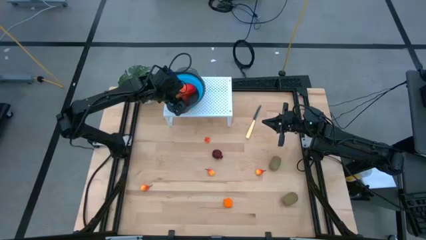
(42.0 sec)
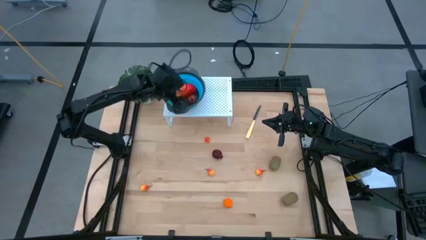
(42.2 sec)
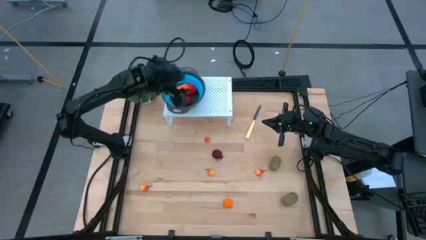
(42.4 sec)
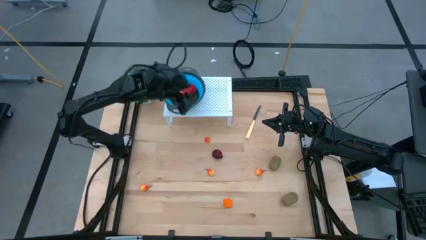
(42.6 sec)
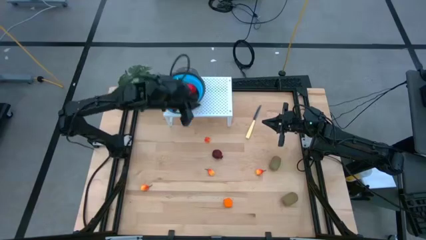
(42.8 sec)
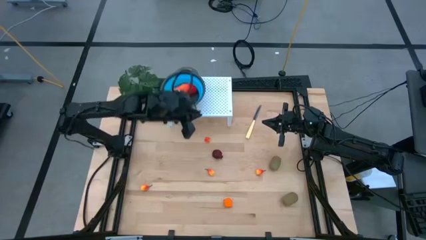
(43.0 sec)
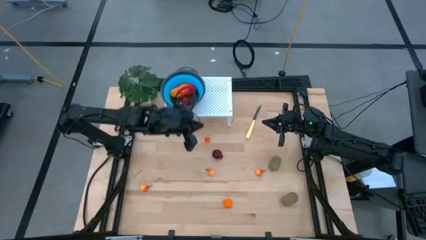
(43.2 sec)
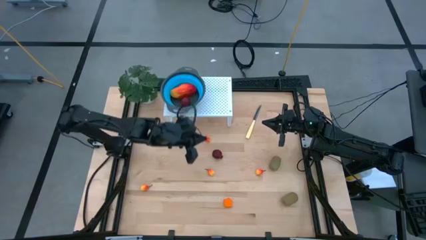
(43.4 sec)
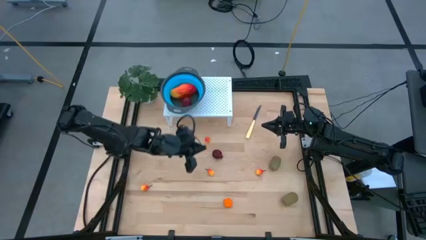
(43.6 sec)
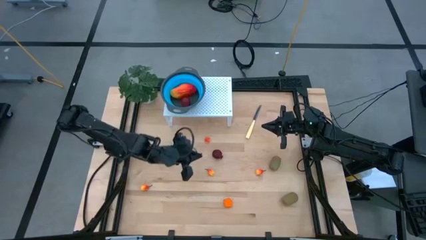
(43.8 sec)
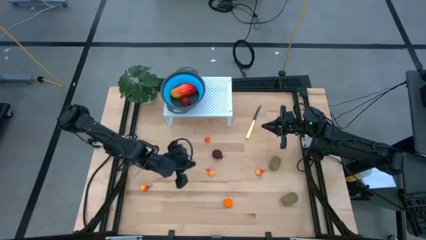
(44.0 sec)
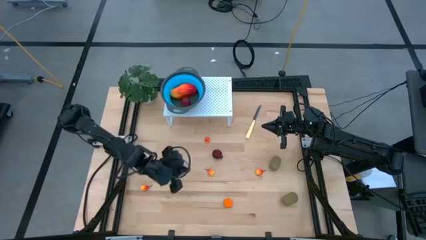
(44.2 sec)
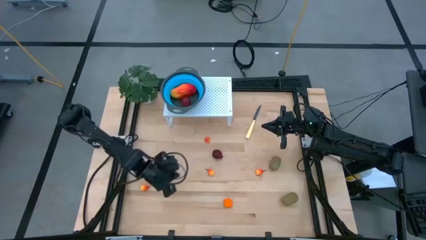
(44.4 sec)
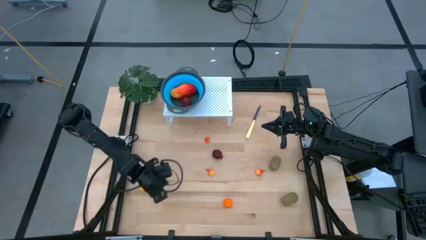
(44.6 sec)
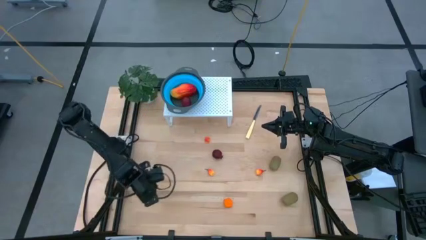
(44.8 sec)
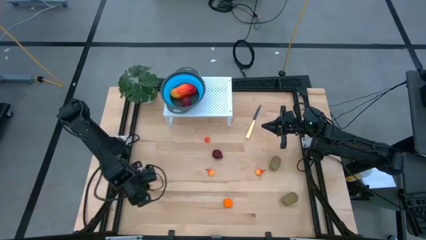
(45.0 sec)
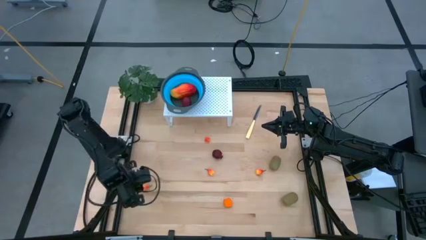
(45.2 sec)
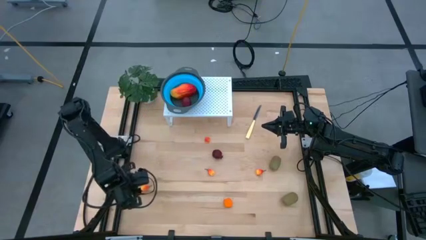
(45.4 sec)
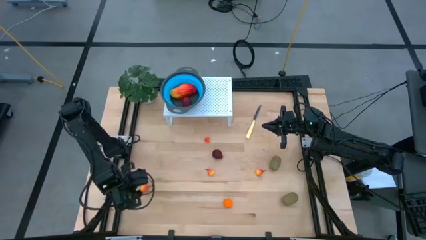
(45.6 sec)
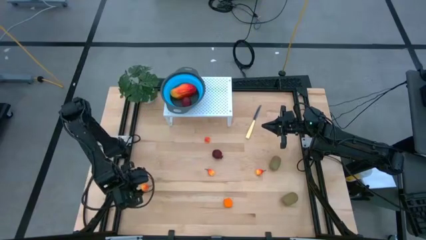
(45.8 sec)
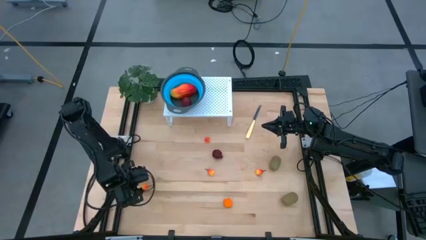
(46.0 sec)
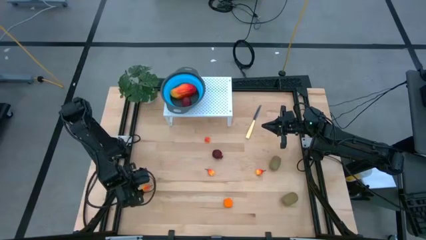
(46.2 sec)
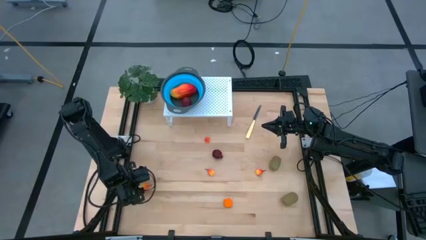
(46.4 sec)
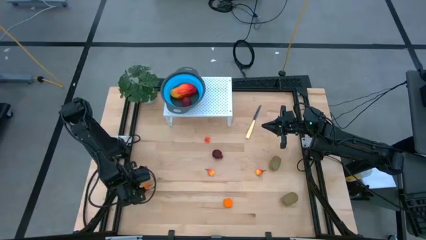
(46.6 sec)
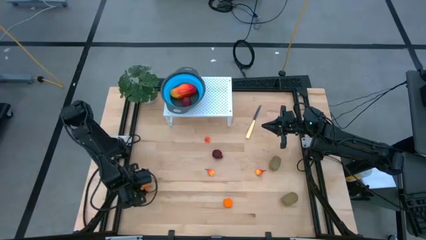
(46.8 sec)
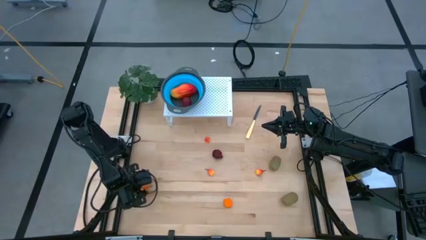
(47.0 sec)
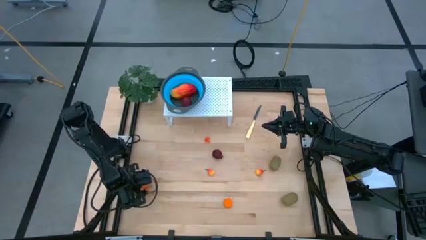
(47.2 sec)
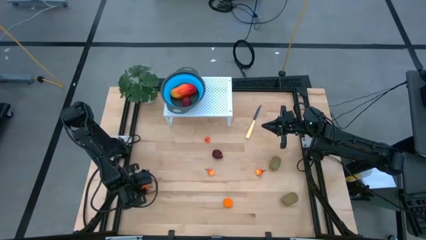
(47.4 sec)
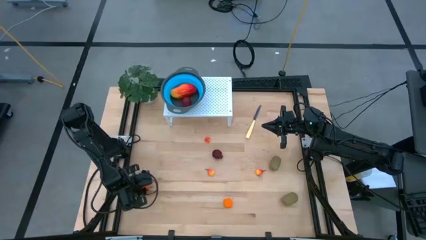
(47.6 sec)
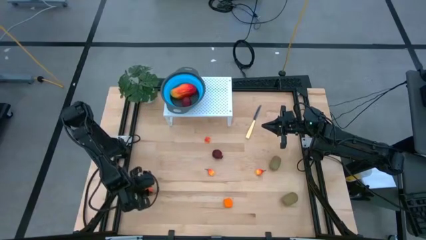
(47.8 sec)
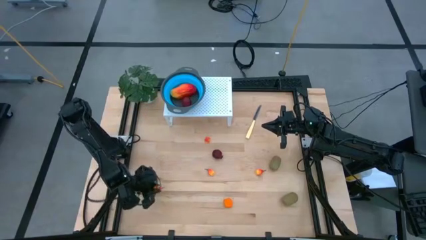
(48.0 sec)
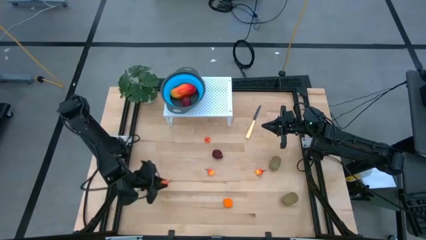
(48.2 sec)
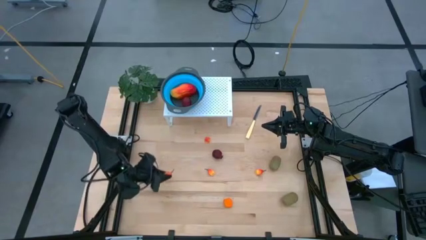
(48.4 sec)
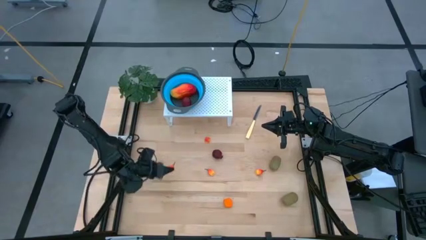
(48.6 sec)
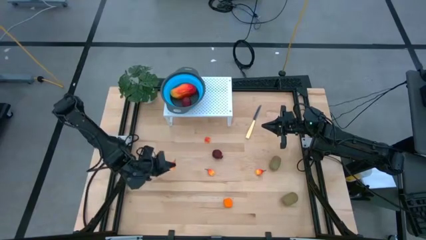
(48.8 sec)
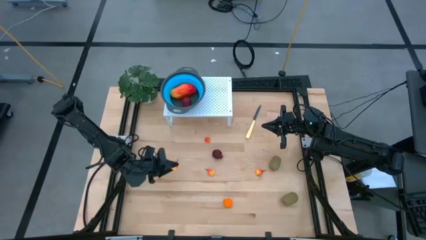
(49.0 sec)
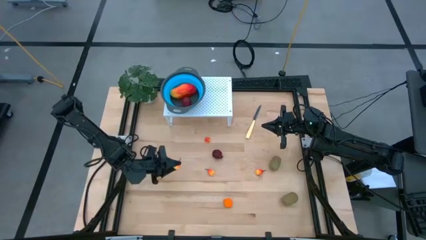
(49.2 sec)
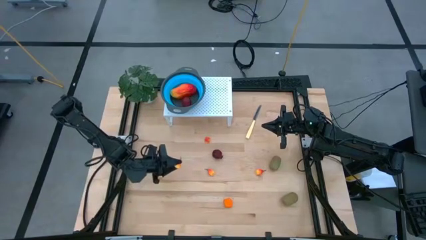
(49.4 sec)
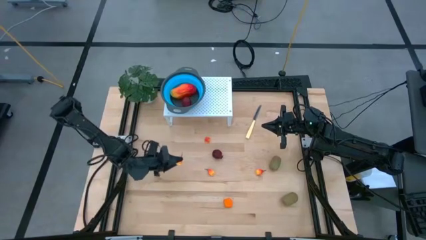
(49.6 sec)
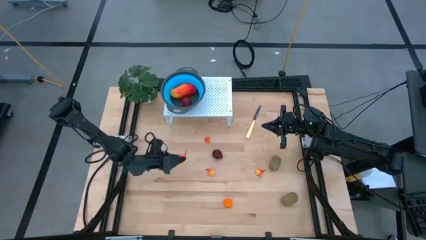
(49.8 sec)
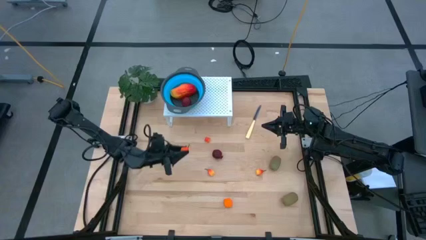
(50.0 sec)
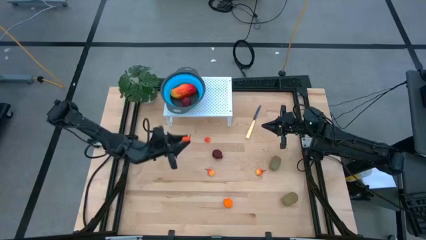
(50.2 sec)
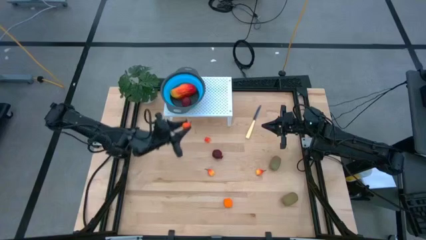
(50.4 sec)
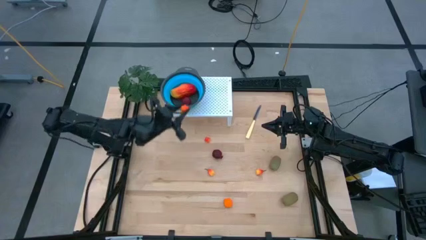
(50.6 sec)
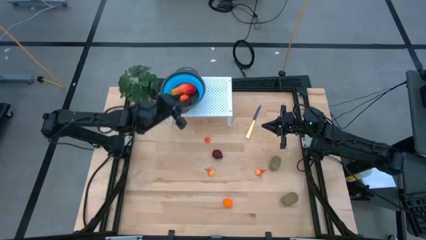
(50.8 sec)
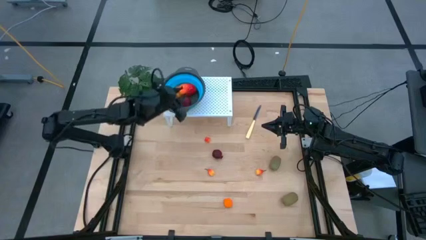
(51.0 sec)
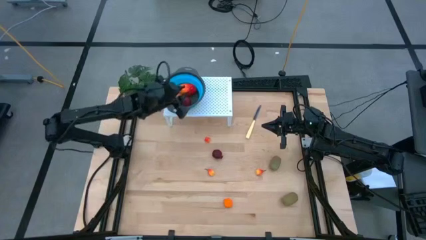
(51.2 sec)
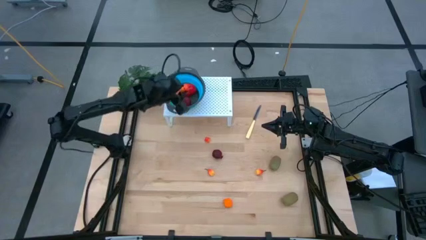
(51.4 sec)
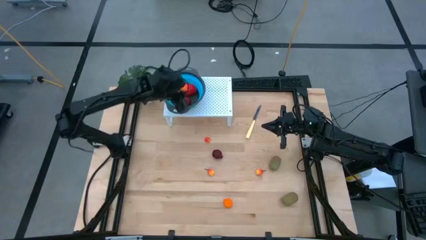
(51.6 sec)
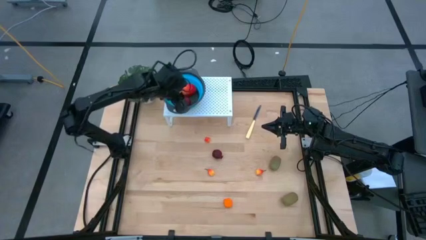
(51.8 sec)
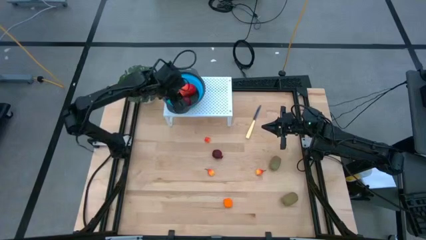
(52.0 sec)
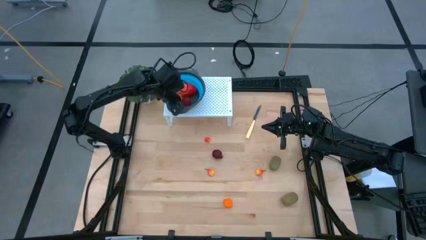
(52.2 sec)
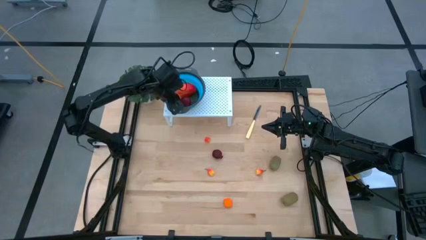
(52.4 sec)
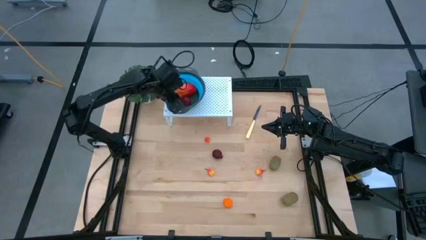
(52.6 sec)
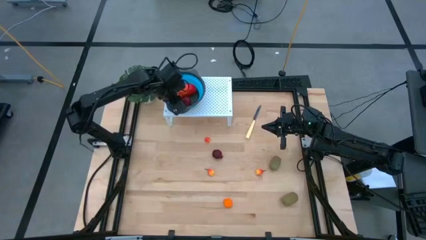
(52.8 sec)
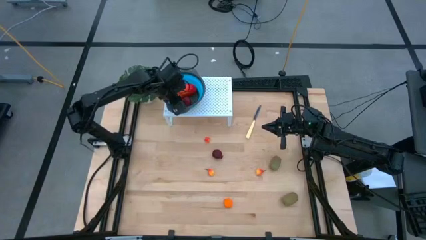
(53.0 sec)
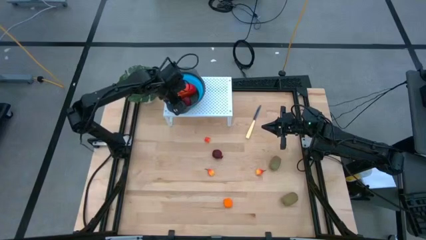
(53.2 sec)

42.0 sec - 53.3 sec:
Task: Pick & Place Fruit
Put the peas into the strainer bowl on the shelf

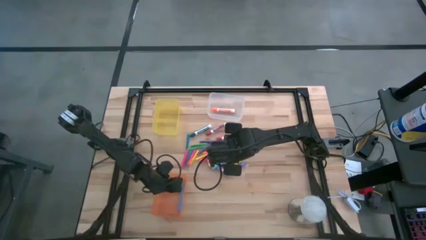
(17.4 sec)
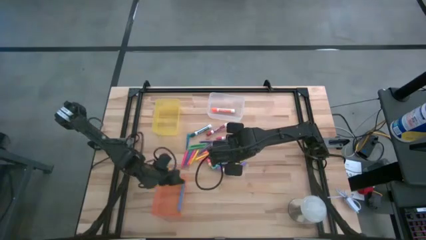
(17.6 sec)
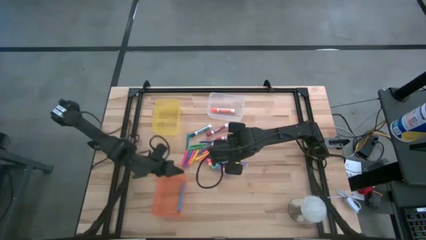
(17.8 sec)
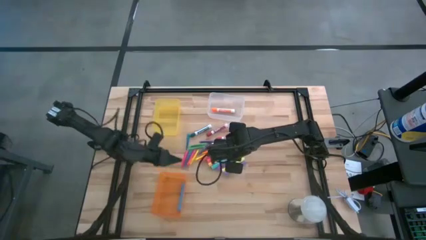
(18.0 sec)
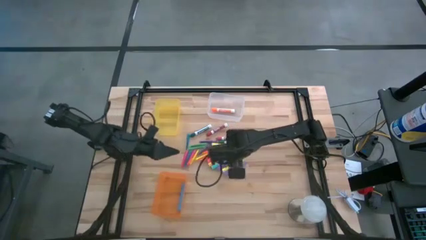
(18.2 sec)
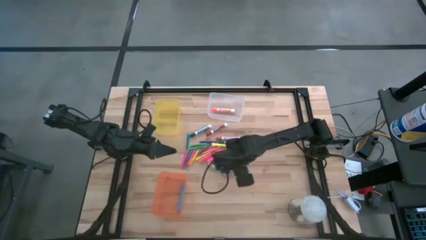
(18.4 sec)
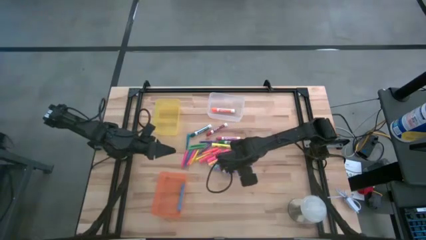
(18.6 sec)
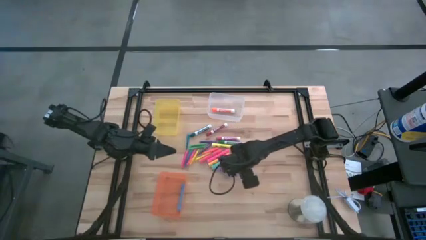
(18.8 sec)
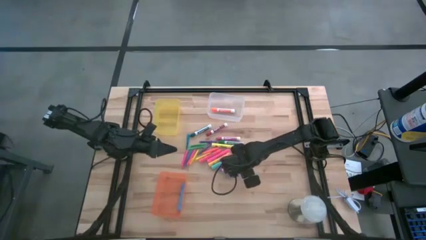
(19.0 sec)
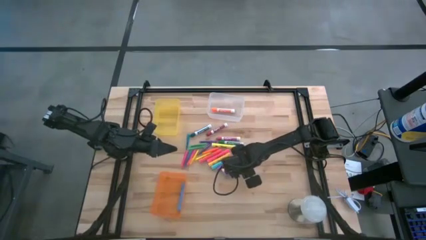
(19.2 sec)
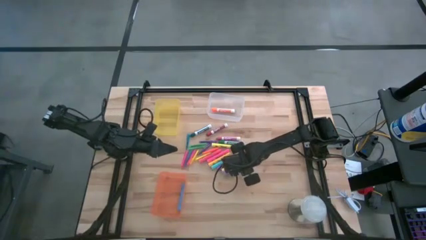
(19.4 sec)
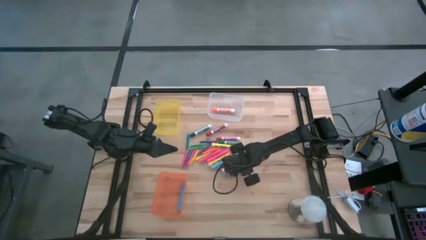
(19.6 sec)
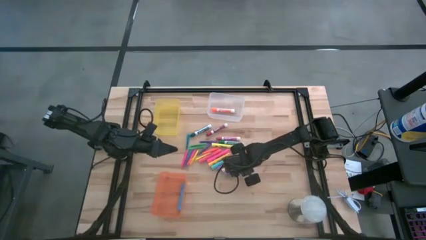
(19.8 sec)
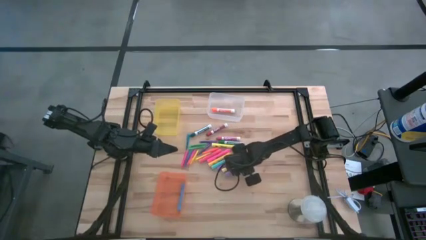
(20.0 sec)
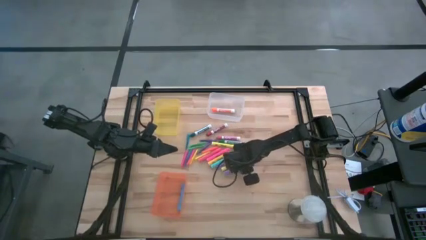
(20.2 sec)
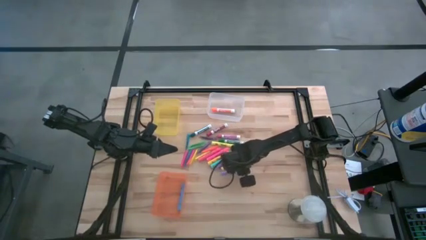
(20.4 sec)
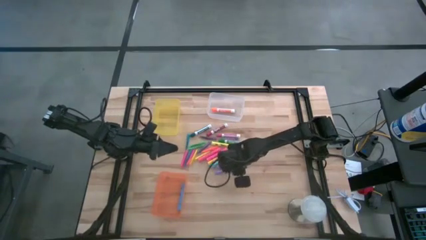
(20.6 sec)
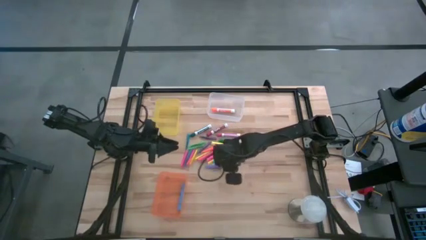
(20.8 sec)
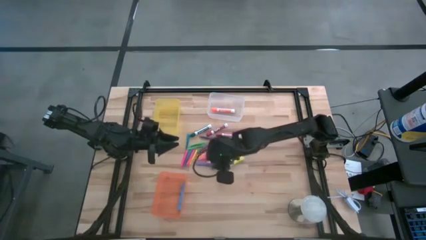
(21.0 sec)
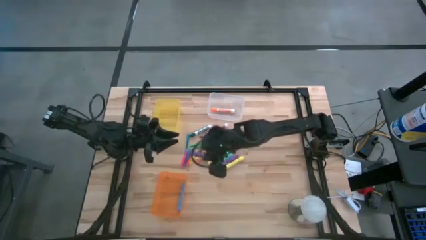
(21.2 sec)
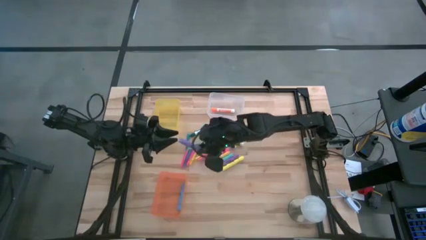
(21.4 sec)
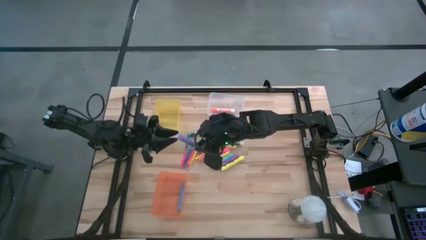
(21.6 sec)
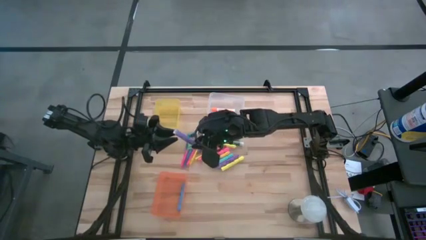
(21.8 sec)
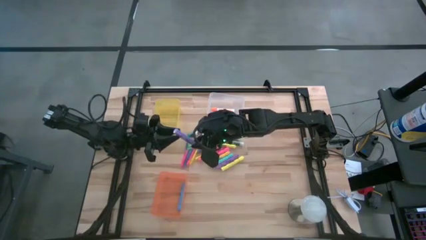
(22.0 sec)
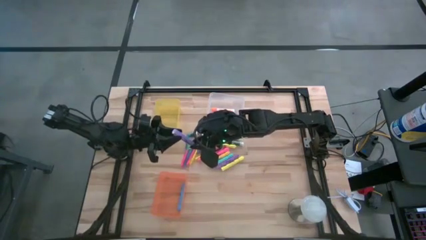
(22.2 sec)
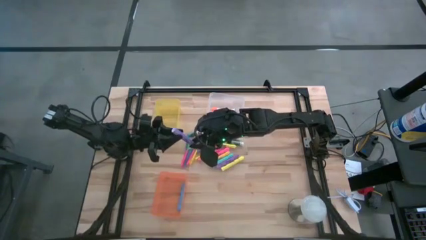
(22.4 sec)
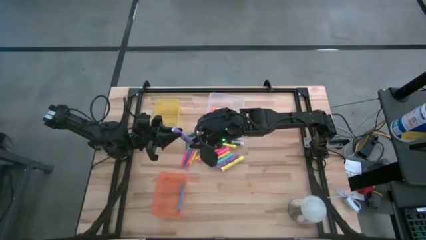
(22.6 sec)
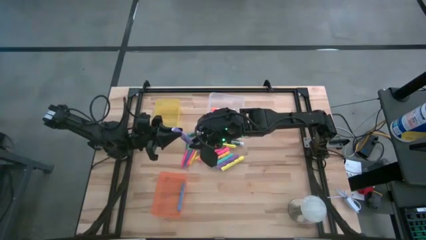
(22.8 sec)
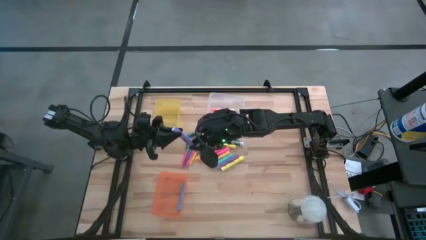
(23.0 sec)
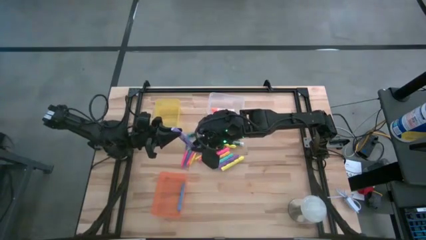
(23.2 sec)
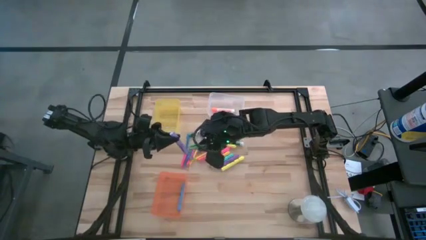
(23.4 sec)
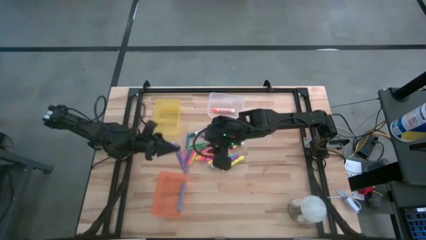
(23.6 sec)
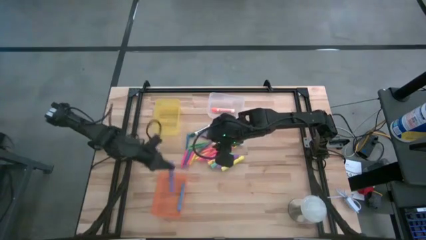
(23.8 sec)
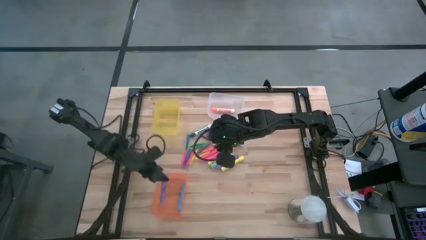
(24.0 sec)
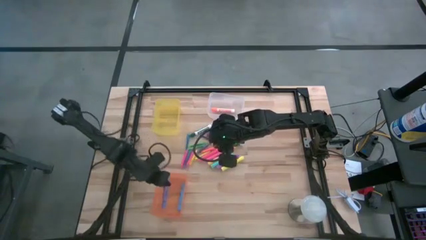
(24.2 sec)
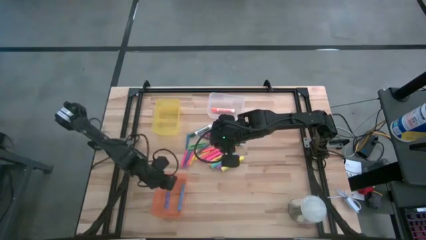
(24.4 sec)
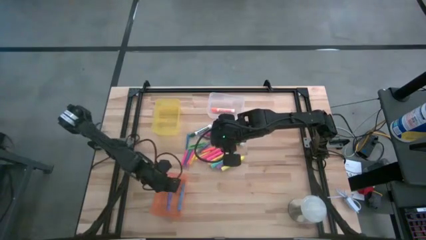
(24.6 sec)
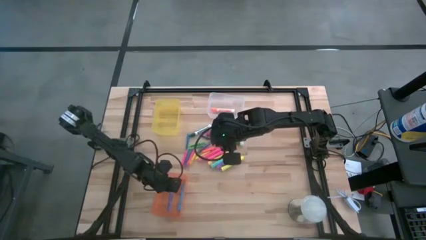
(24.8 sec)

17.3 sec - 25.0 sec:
Task: Pick & Place Markers
Put the purple highlighter into the orange bin
